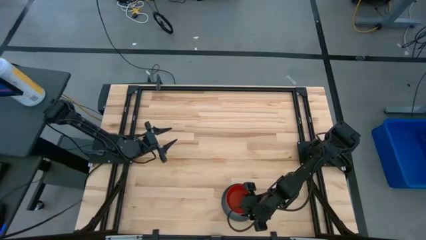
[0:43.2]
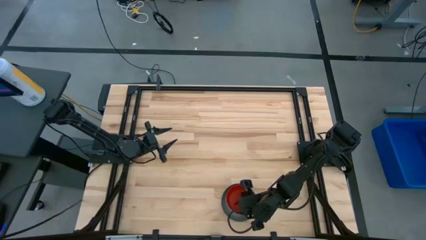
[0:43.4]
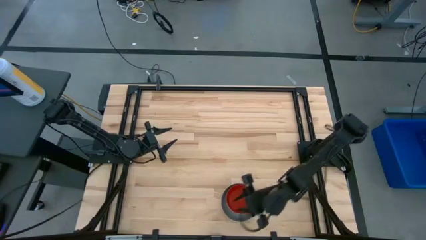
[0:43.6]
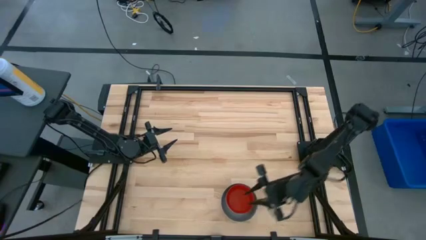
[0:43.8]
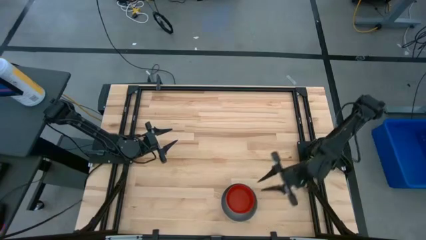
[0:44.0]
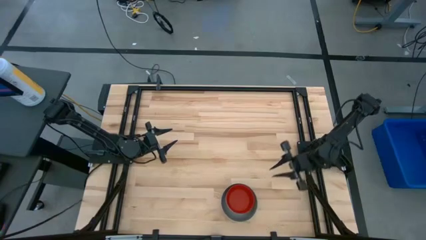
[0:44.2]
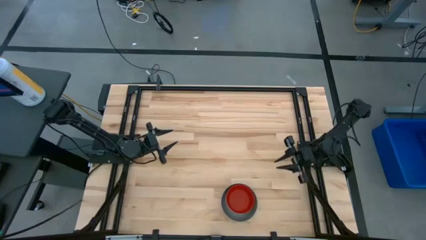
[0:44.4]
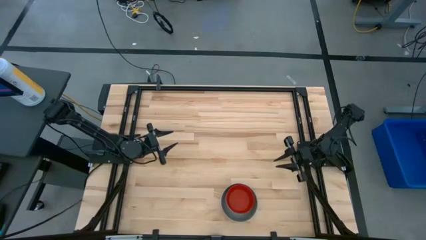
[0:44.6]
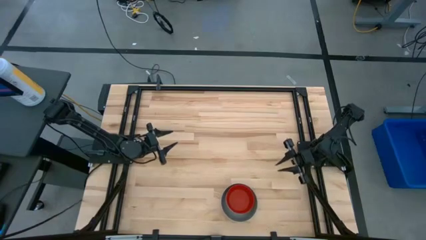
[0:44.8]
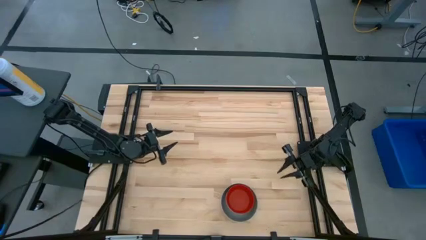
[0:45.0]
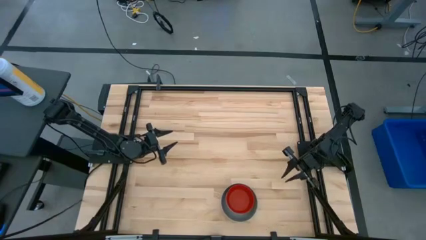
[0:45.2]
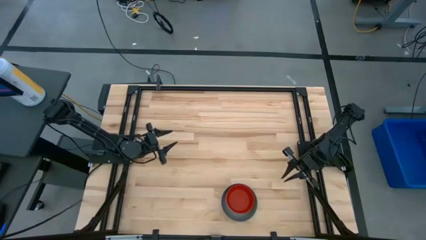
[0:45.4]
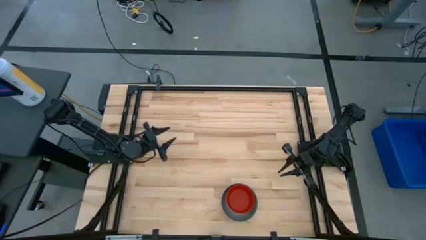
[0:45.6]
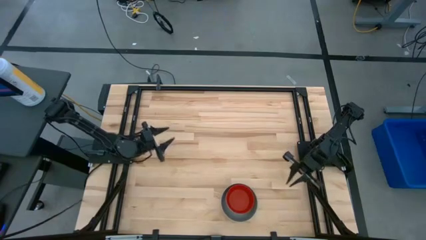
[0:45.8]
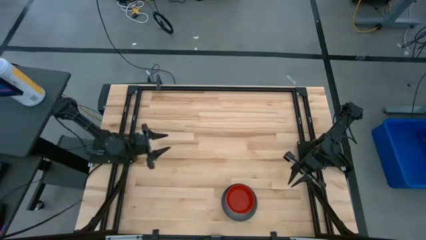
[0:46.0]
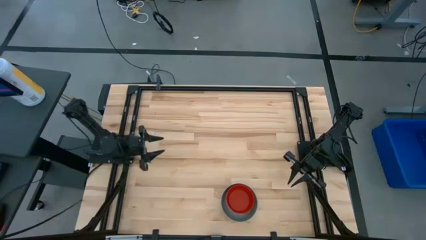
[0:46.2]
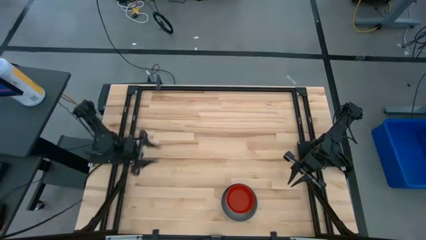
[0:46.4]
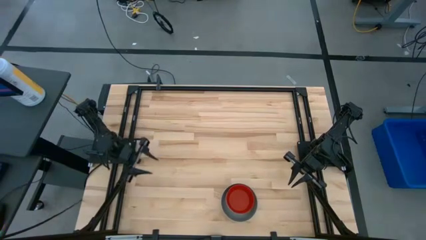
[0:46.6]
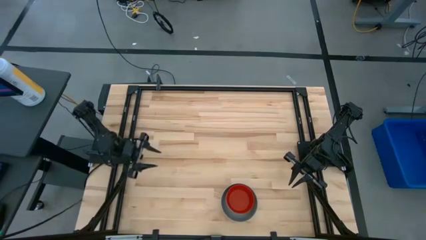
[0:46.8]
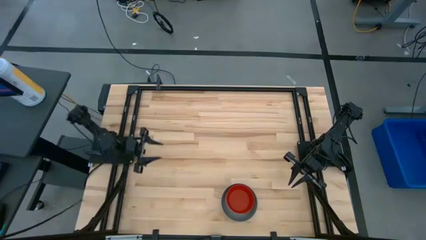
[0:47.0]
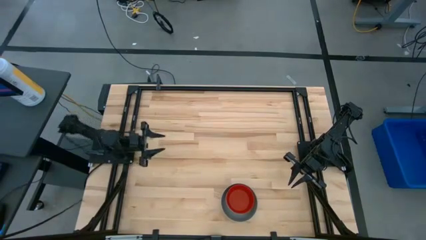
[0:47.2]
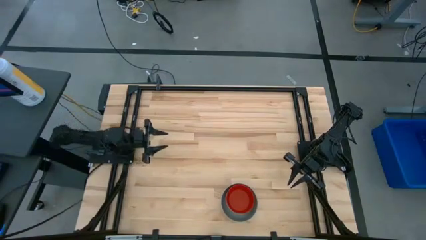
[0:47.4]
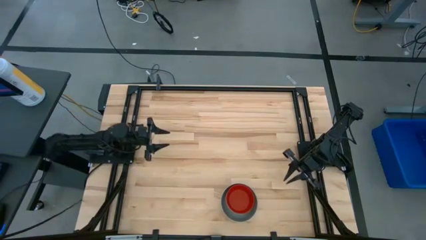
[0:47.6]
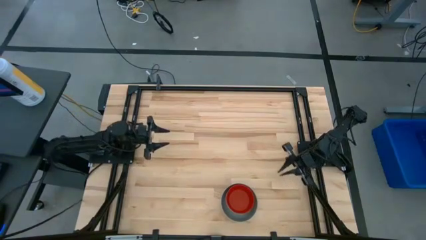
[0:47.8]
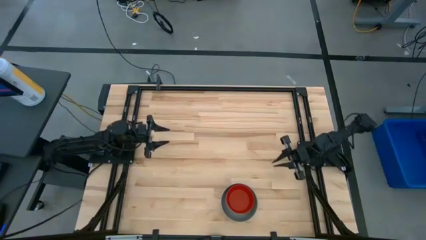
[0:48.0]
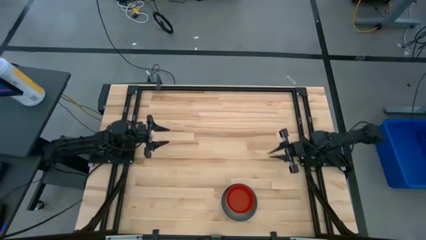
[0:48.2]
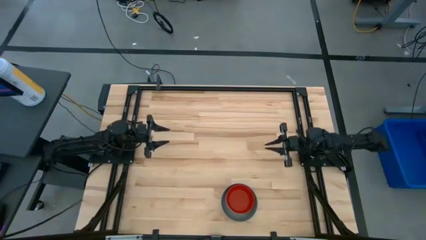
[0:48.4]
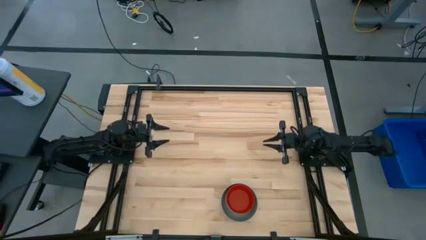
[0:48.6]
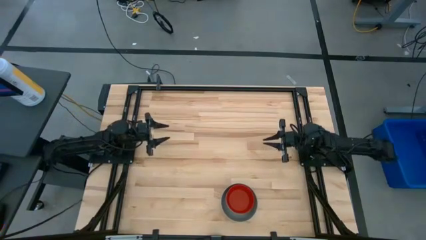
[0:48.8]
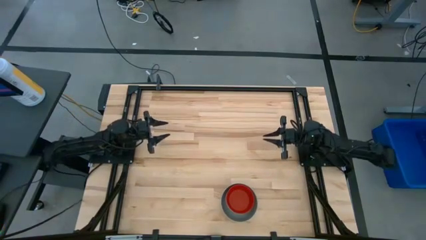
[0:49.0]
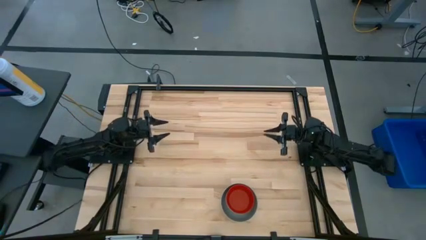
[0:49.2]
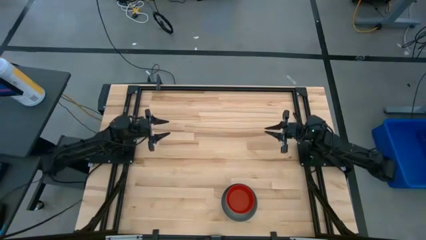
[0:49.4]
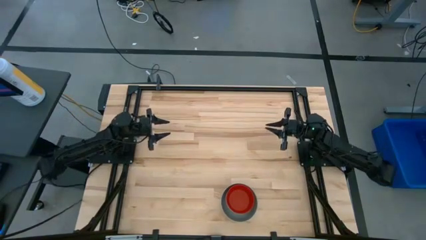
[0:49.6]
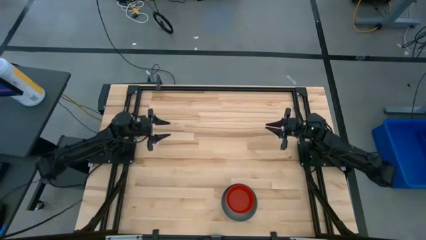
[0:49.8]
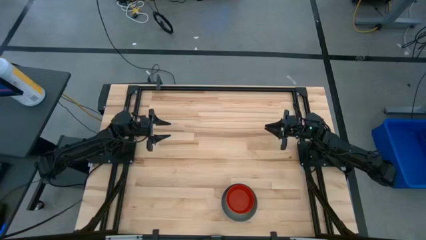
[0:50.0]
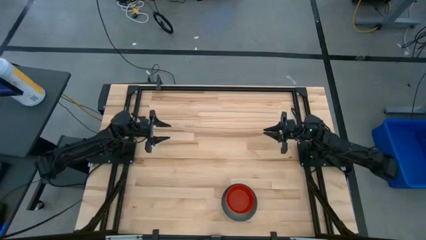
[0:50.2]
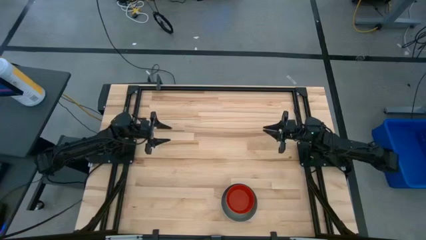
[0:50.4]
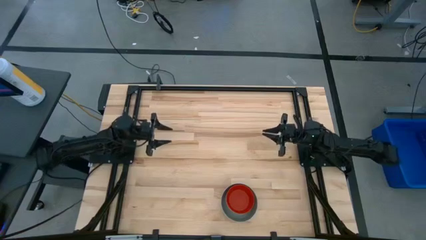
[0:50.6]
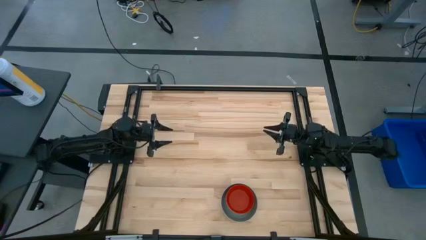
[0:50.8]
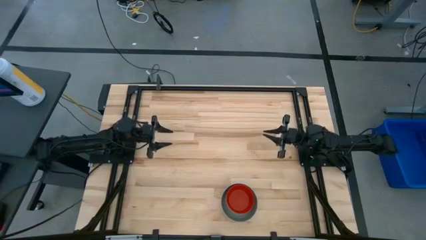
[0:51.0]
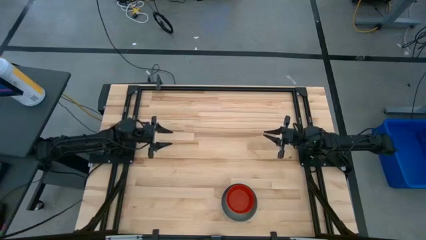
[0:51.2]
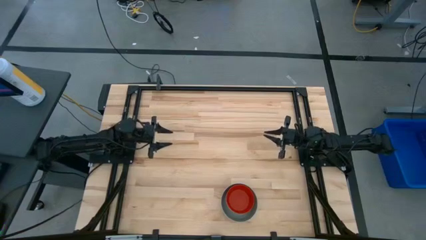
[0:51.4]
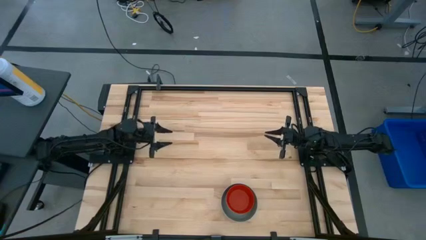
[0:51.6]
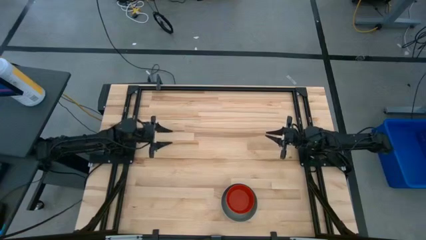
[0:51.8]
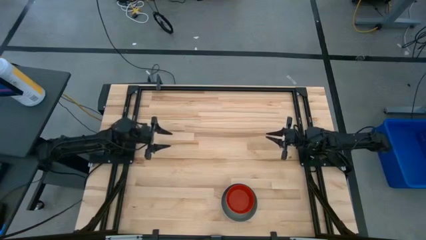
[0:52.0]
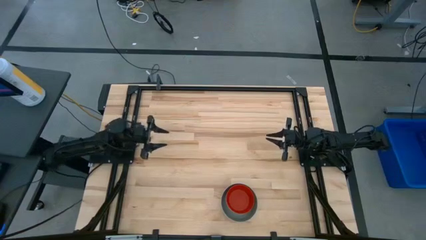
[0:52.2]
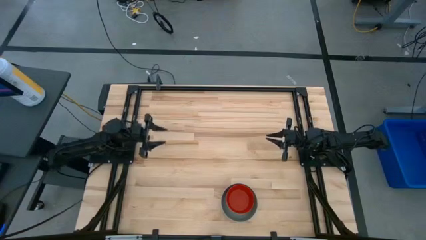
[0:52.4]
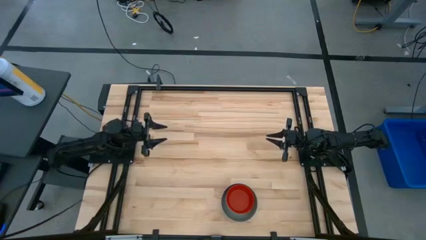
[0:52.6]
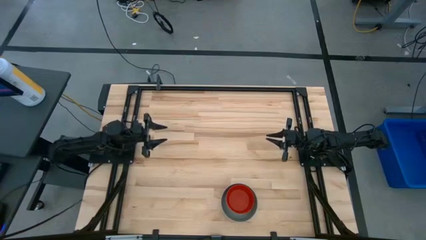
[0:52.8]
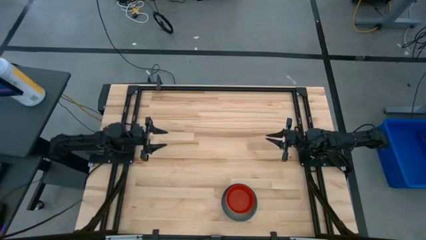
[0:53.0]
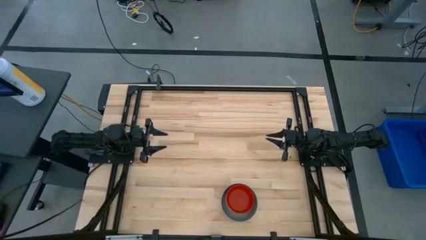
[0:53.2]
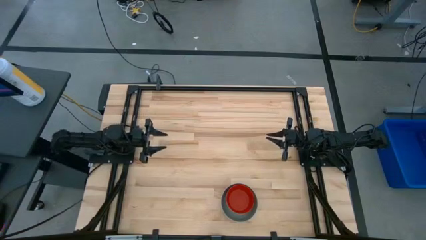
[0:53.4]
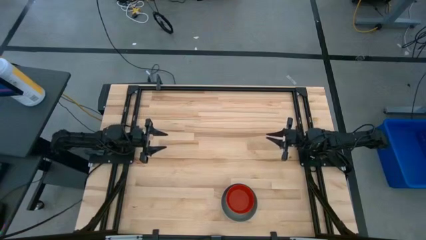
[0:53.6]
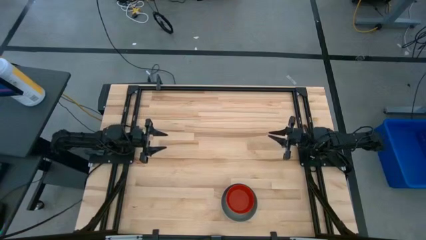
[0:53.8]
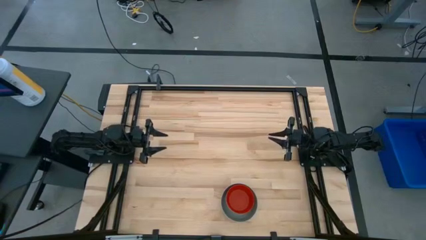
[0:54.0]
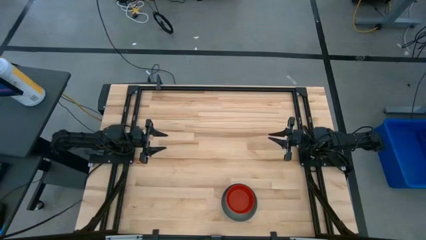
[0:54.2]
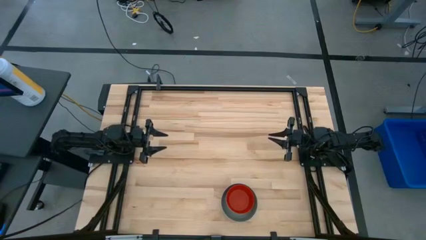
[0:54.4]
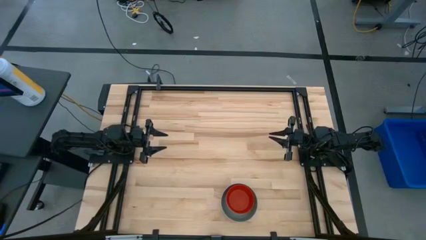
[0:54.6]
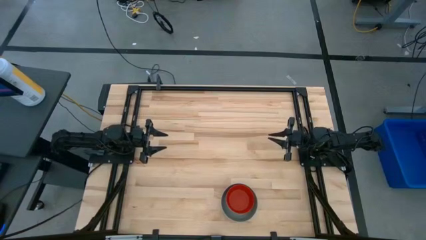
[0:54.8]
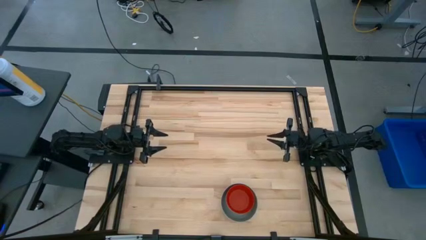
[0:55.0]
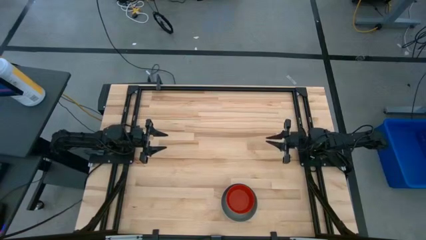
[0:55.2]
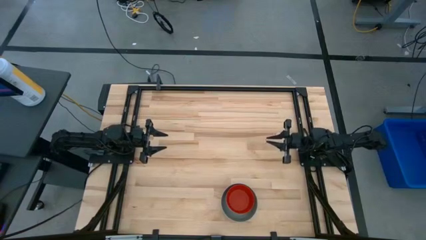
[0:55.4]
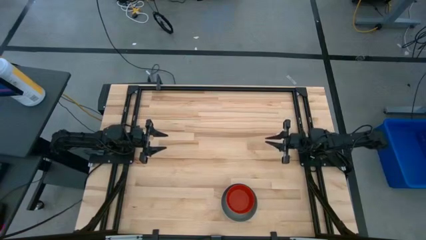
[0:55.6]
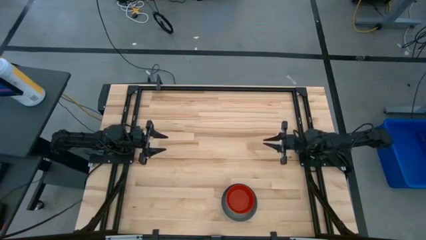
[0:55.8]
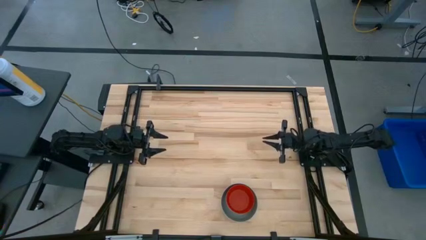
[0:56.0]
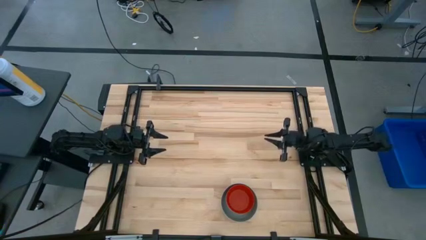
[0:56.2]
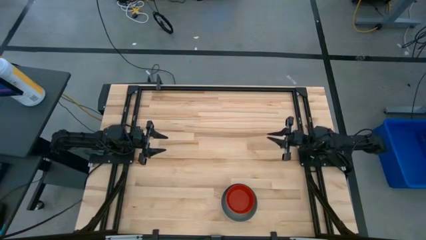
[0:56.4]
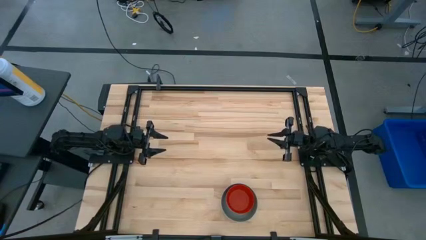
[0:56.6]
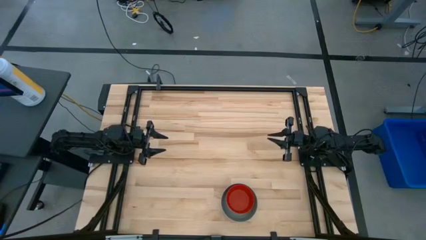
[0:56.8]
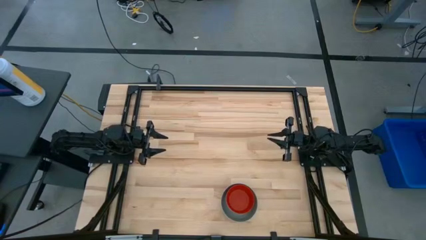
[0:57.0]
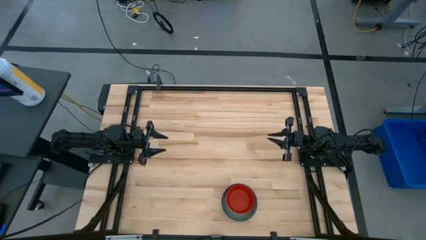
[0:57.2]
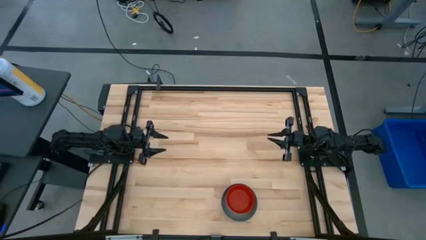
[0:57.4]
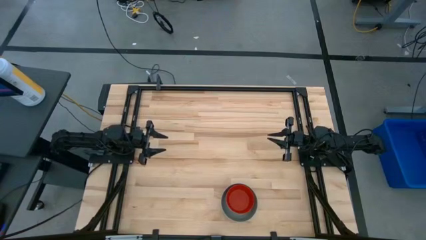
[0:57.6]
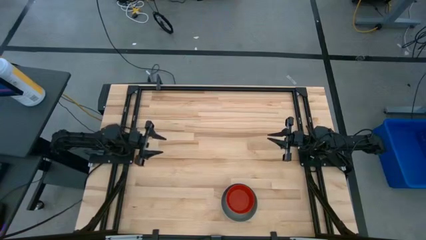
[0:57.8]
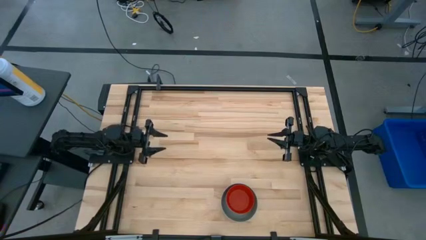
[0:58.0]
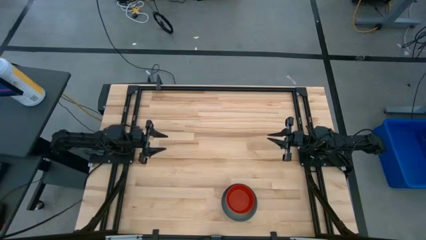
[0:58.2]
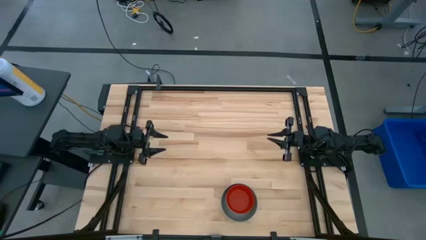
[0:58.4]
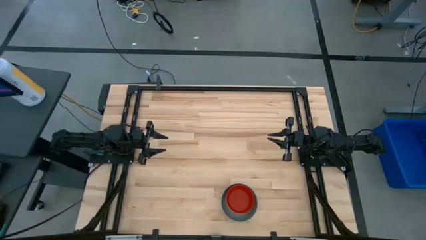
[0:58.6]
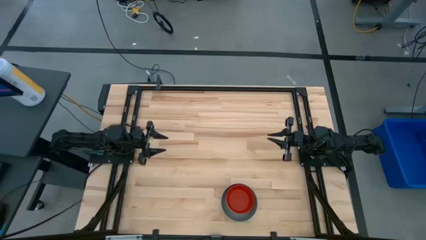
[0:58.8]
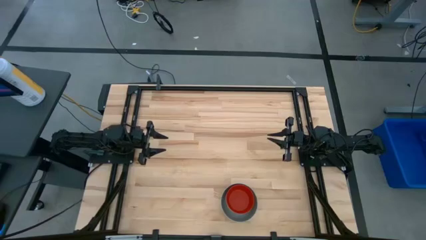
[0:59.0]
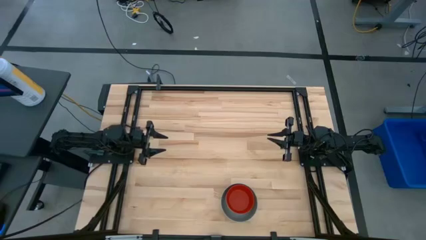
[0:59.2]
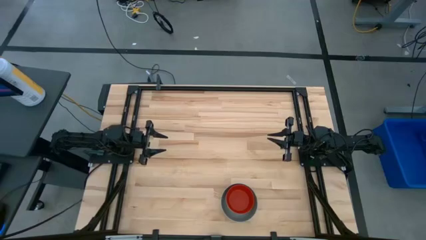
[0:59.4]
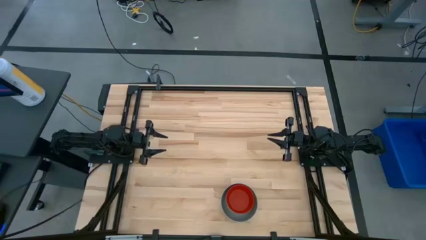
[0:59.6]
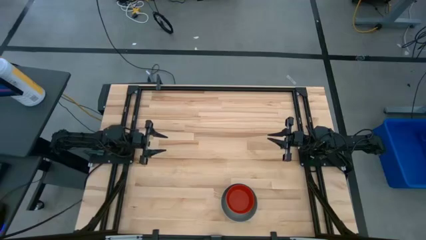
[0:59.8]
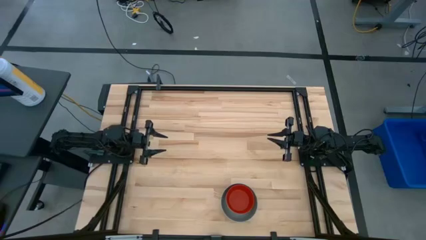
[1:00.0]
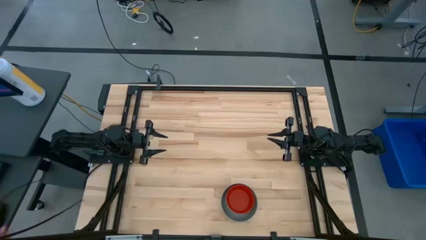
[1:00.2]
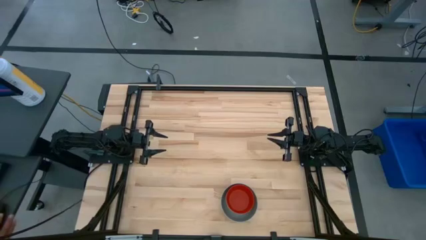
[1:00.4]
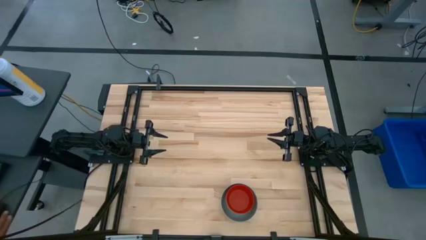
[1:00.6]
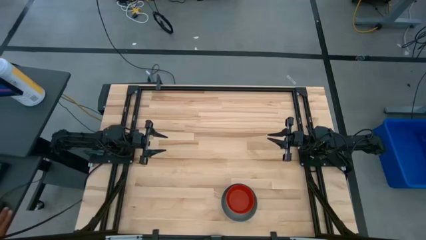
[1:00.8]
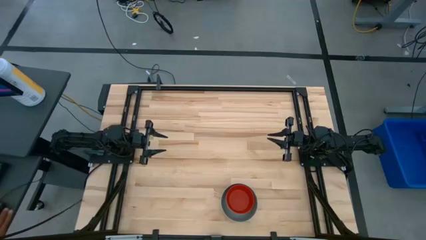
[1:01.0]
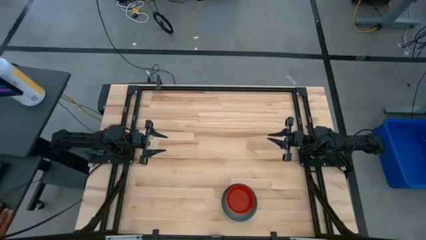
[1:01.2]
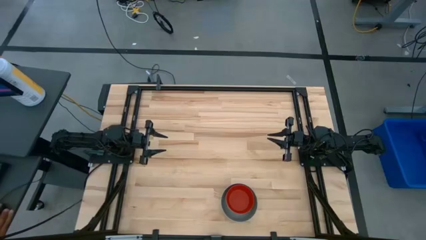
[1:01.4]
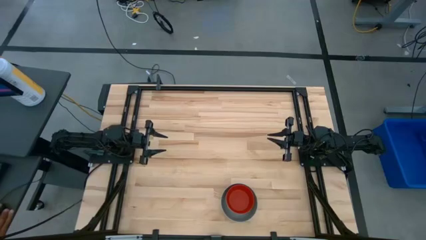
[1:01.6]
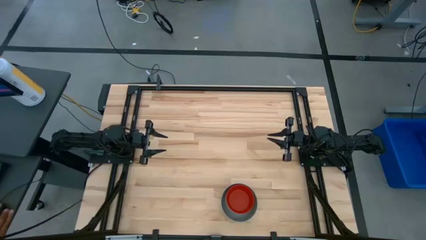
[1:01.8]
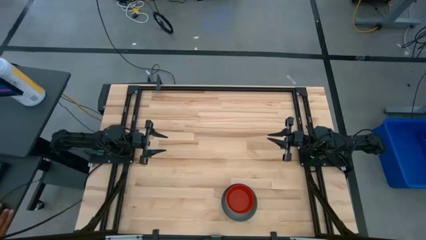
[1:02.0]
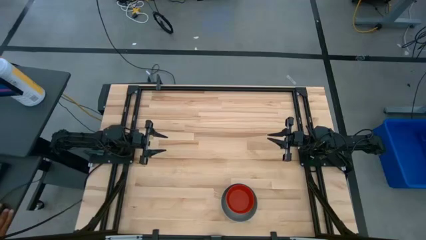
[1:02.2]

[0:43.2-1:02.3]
Return to Home Position
